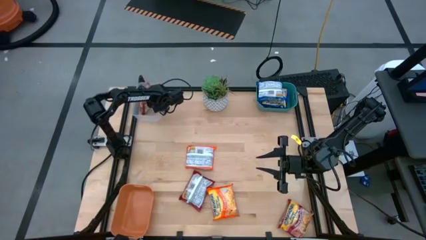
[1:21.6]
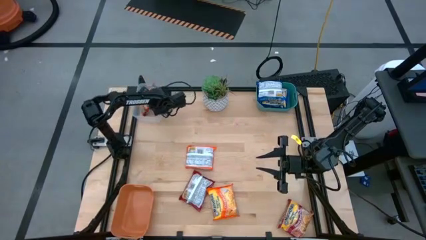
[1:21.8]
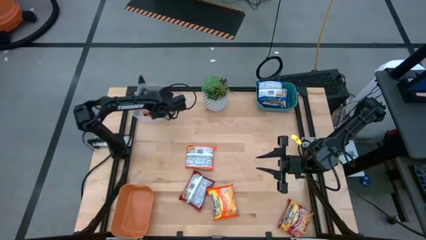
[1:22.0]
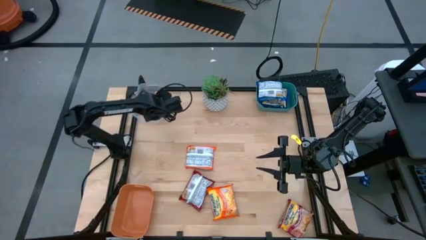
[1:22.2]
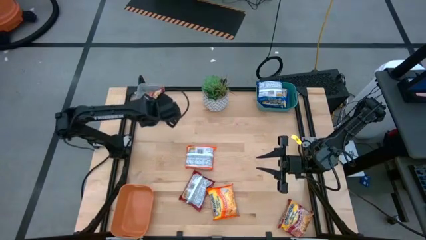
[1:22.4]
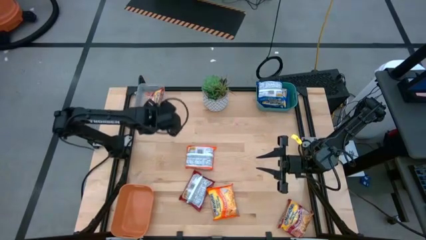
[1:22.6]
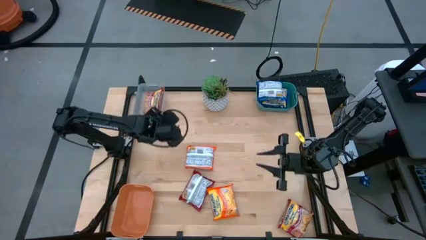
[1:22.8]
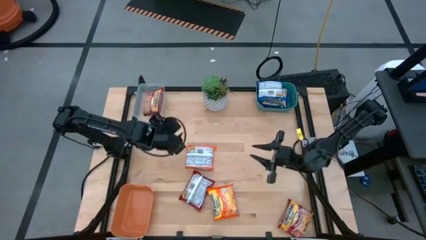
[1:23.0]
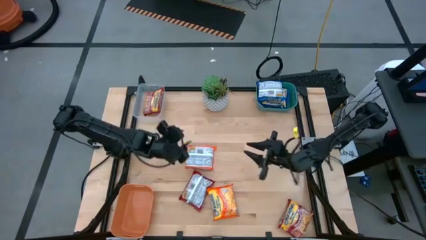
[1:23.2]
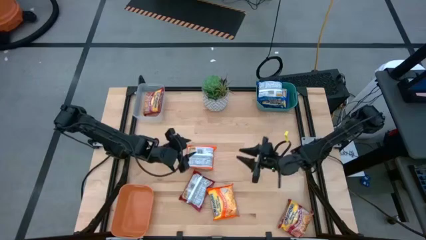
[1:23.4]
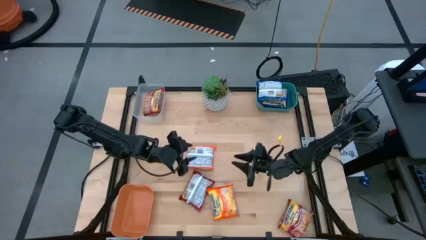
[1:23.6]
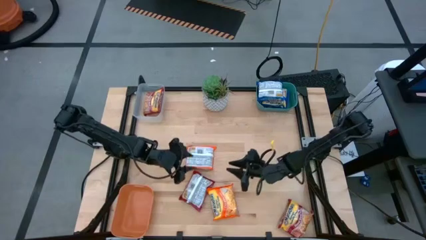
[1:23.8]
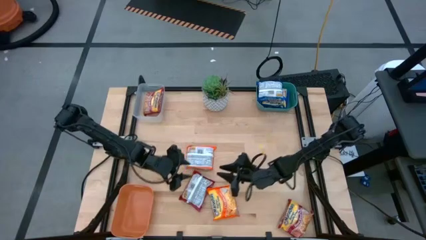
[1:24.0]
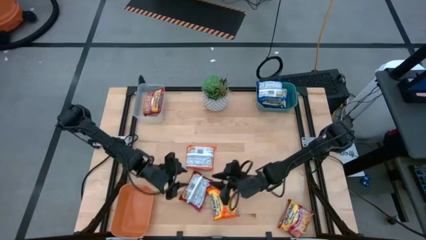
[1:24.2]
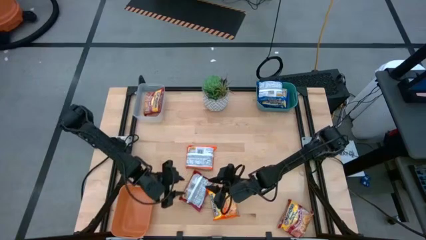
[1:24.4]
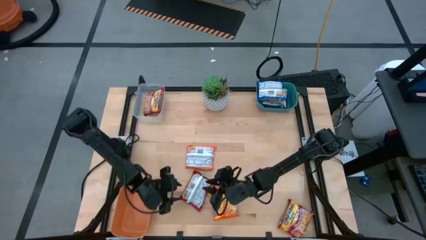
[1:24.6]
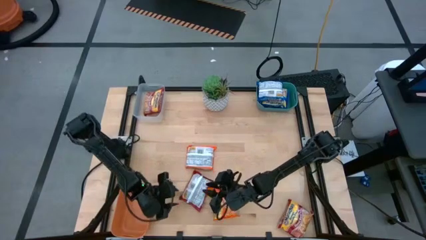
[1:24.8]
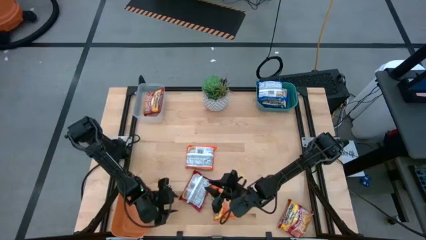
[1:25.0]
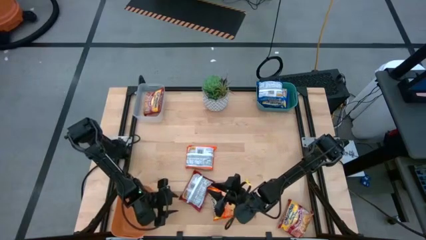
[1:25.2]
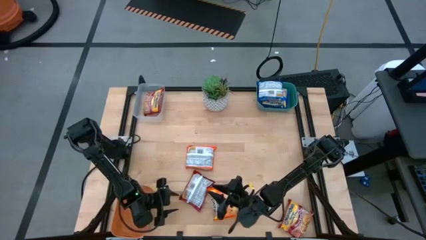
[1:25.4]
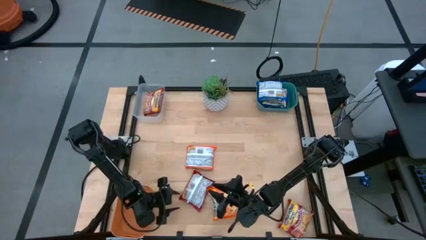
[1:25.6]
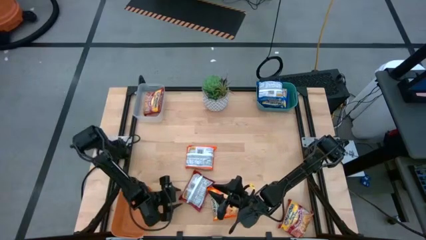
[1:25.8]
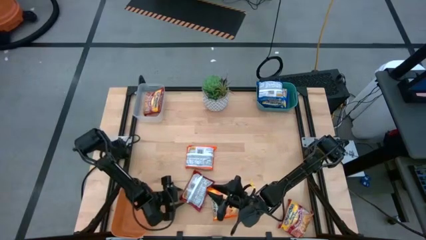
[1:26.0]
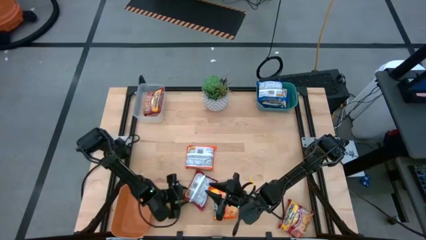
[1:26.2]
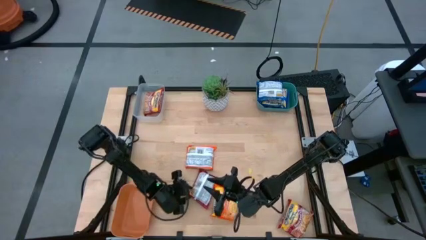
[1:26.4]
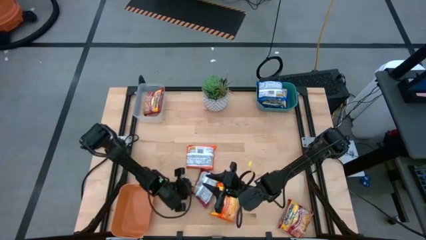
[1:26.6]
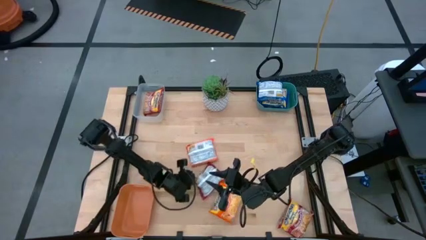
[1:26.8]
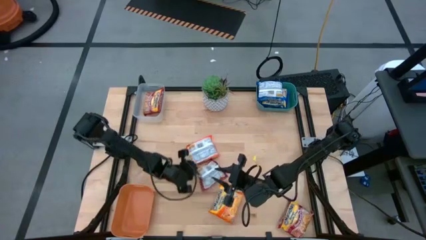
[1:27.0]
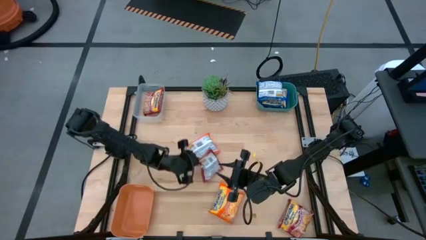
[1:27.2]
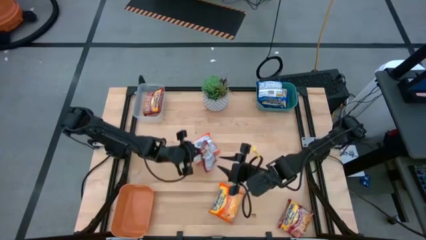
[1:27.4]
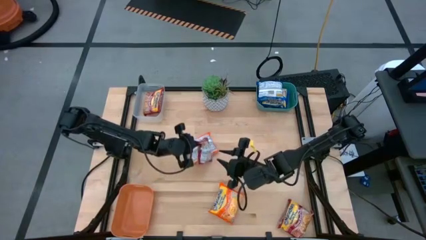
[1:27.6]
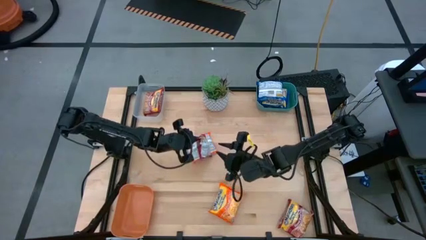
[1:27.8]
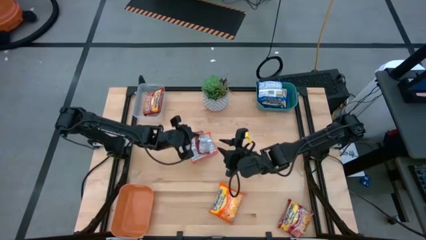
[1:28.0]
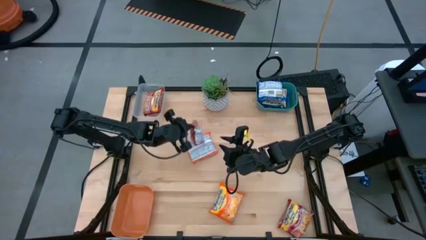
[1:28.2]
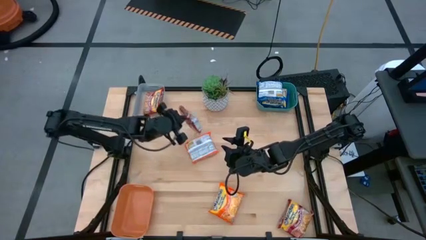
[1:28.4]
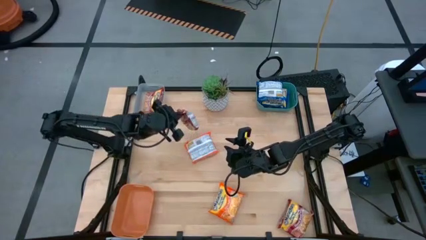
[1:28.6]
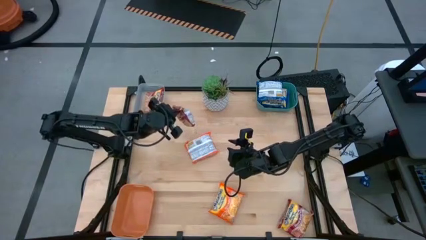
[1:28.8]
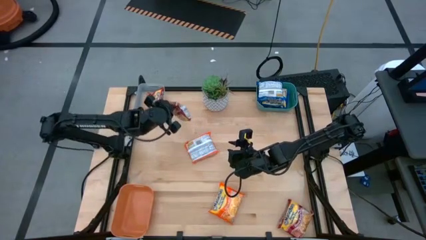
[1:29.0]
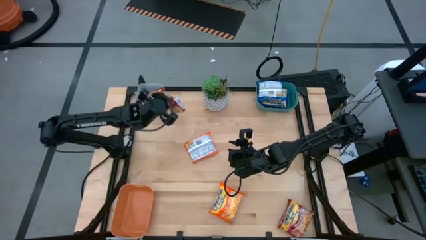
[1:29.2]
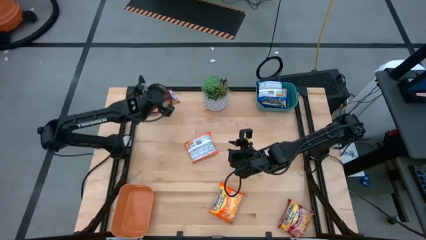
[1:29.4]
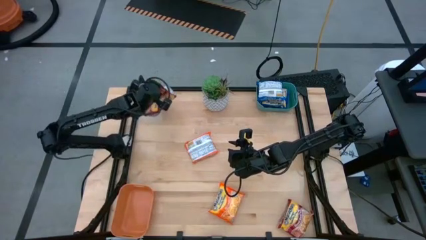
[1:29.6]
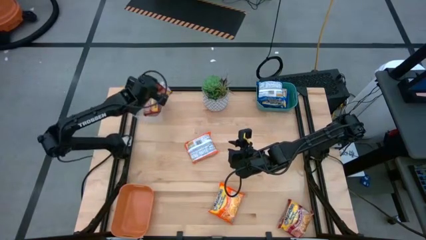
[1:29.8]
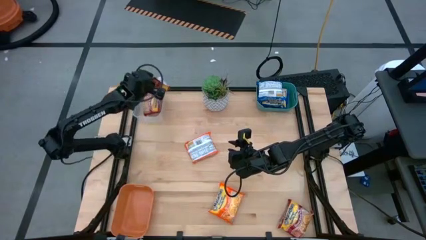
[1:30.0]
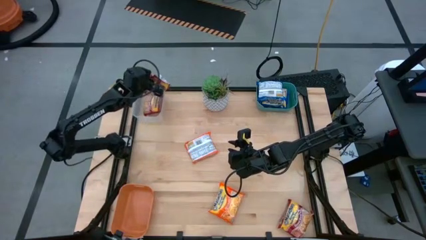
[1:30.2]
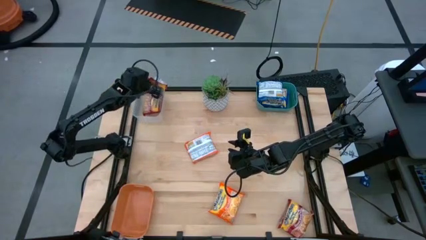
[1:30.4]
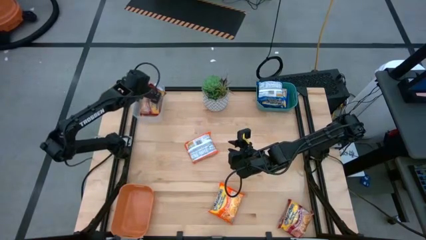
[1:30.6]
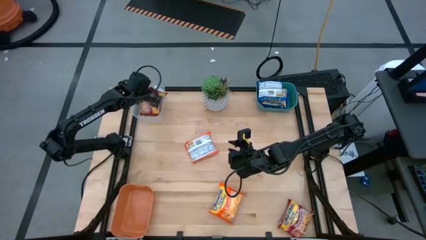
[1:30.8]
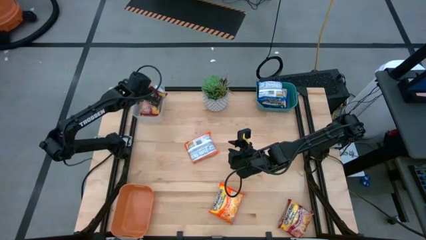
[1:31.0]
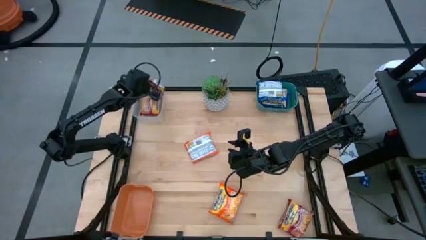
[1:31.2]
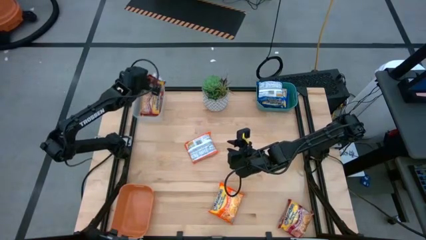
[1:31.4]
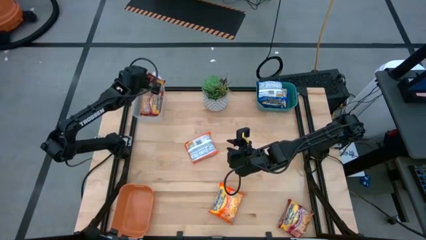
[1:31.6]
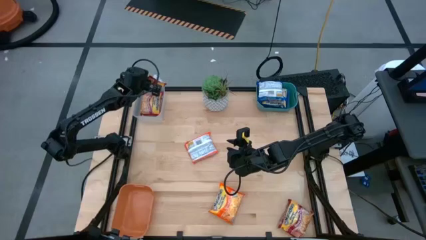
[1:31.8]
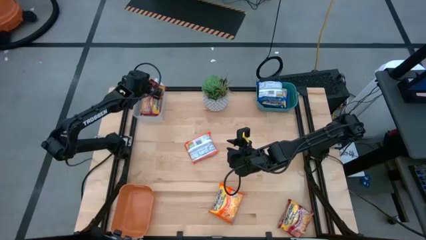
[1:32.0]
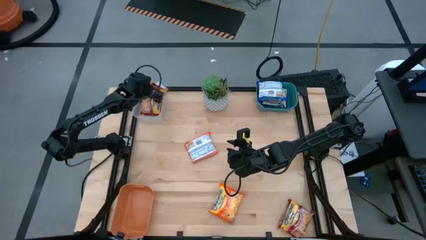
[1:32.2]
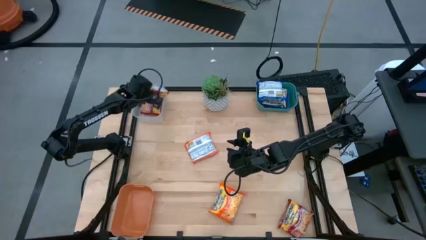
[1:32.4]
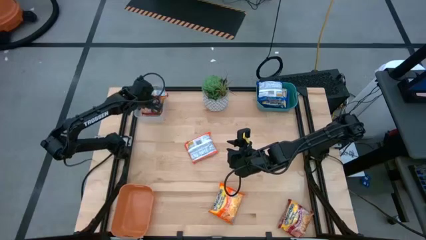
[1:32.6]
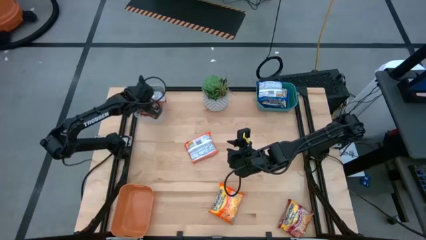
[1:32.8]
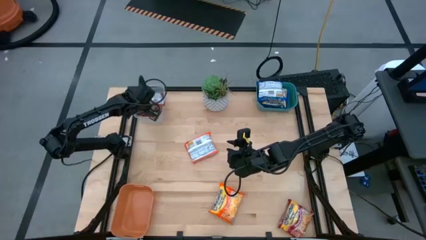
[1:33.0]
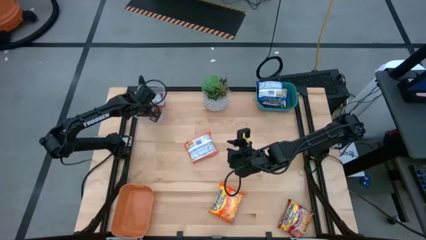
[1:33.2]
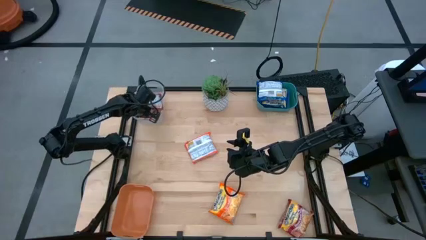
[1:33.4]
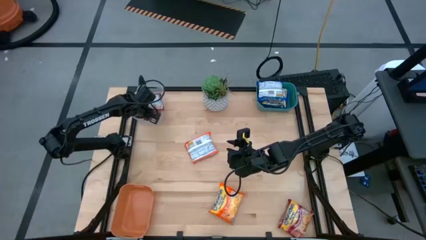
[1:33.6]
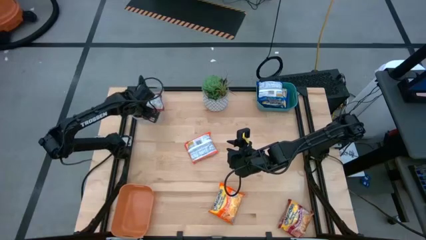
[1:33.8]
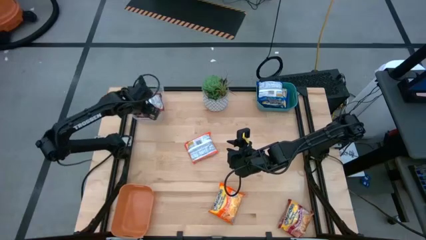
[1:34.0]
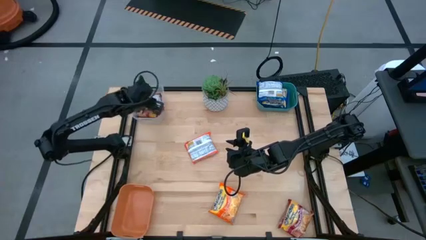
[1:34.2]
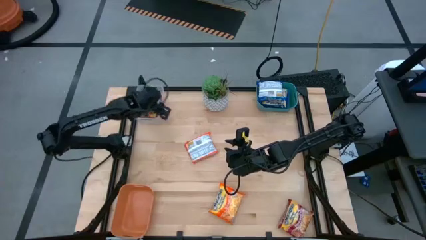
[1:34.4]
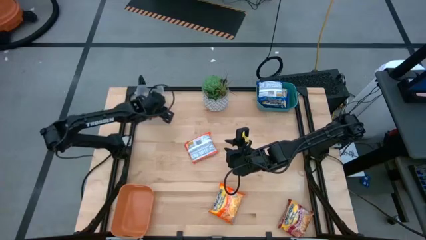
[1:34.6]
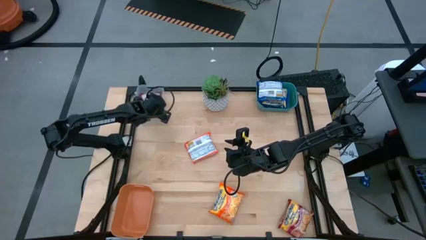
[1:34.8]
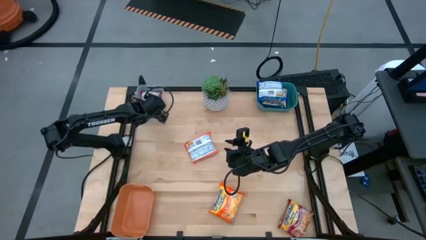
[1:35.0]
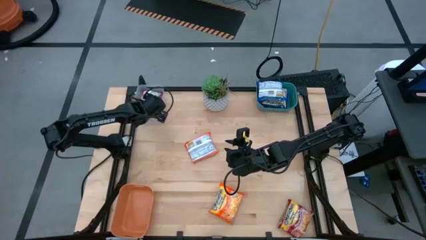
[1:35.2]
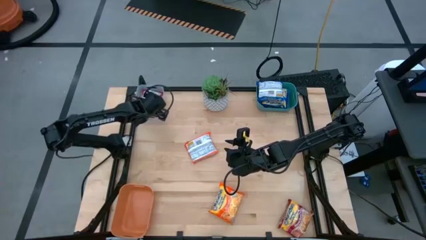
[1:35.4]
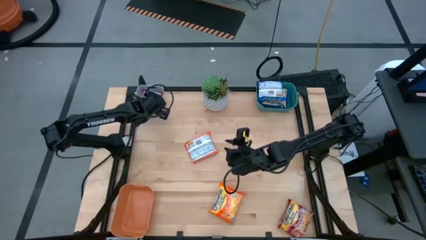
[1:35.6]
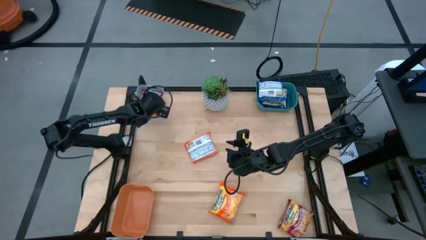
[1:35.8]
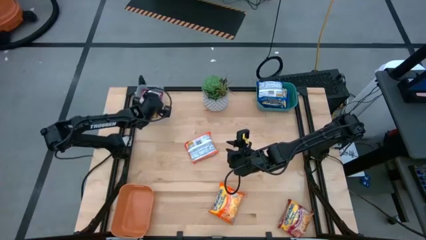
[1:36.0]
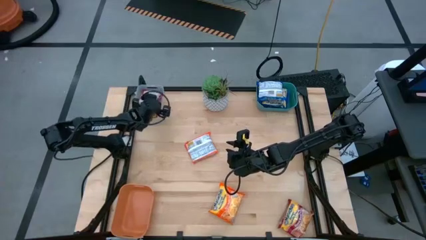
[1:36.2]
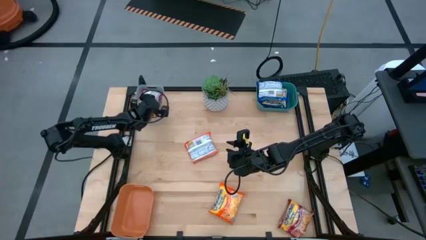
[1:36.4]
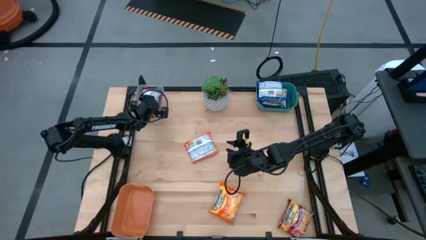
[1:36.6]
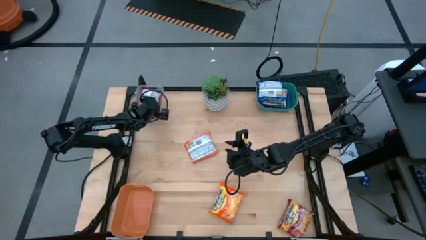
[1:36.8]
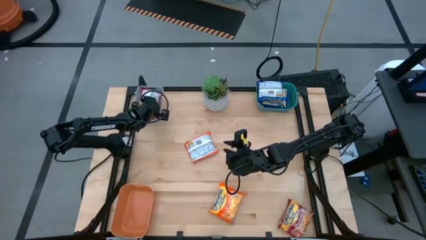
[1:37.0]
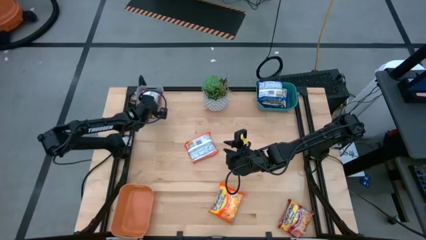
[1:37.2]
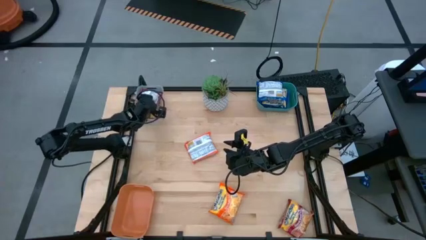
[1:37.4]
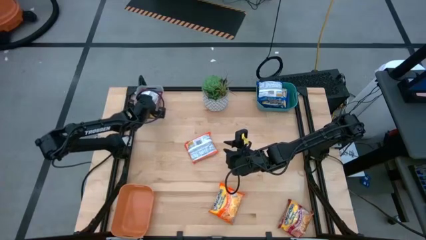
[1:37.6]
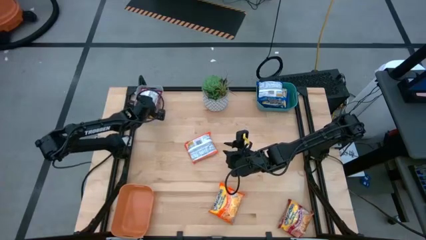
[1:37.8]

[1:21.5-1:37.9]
Task: Sort Maruchan noodles
Put the left red noodle pack into the transparent bin
